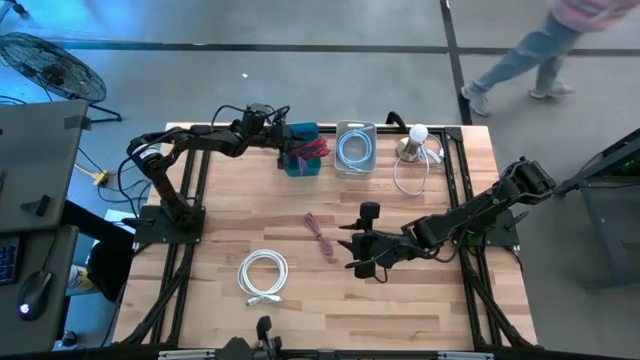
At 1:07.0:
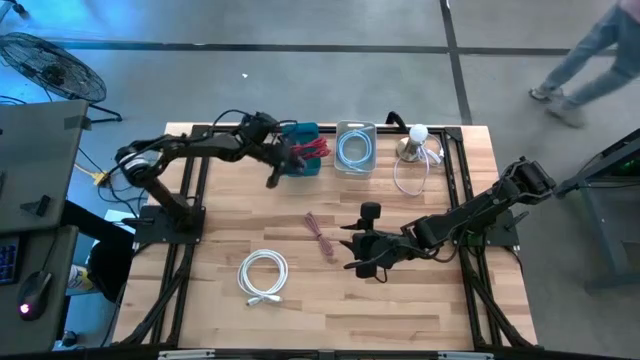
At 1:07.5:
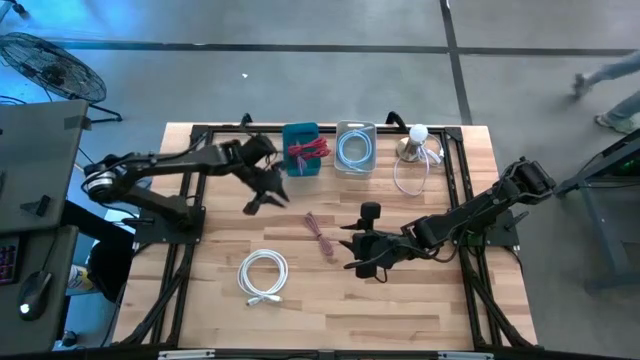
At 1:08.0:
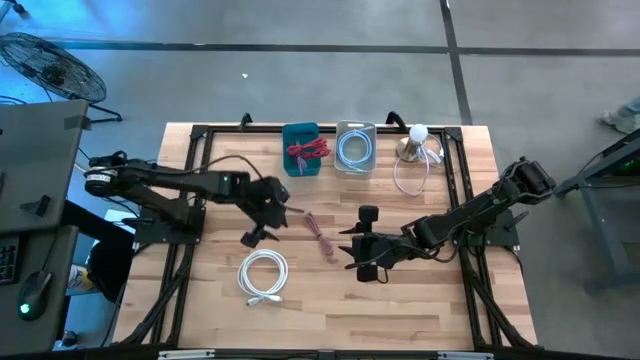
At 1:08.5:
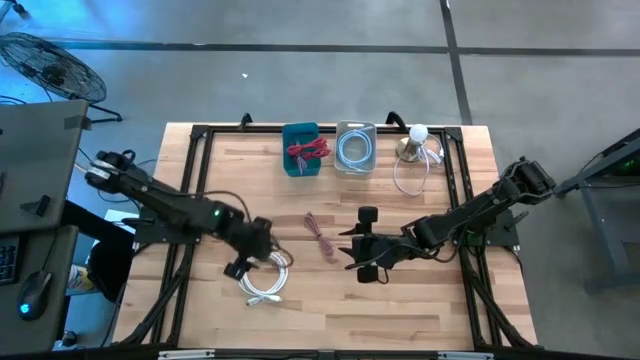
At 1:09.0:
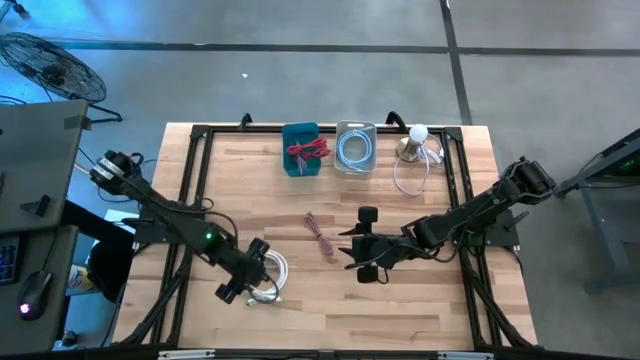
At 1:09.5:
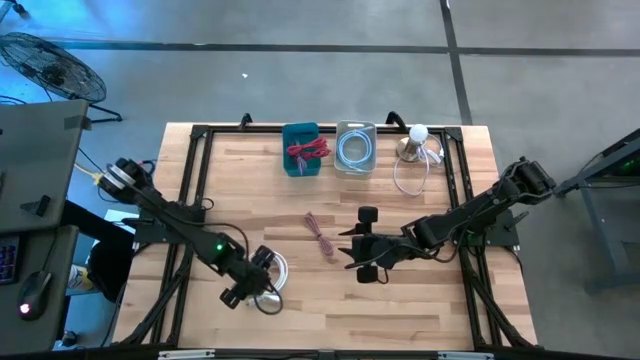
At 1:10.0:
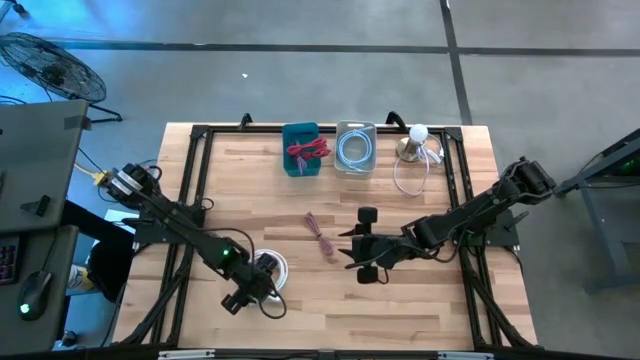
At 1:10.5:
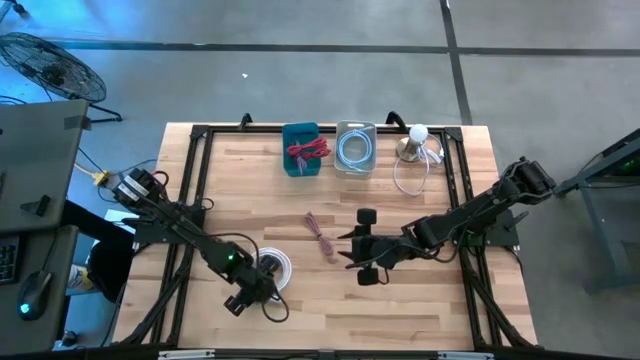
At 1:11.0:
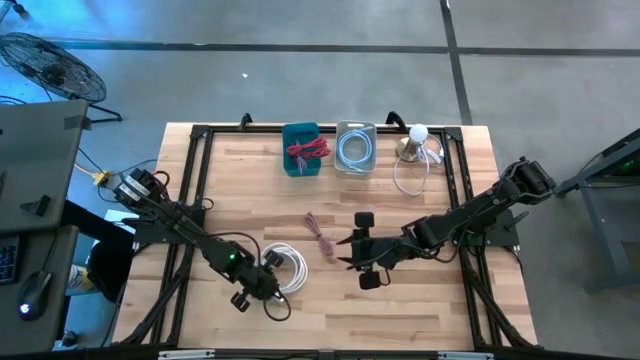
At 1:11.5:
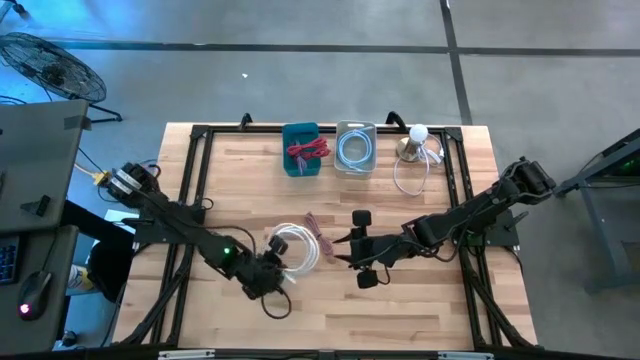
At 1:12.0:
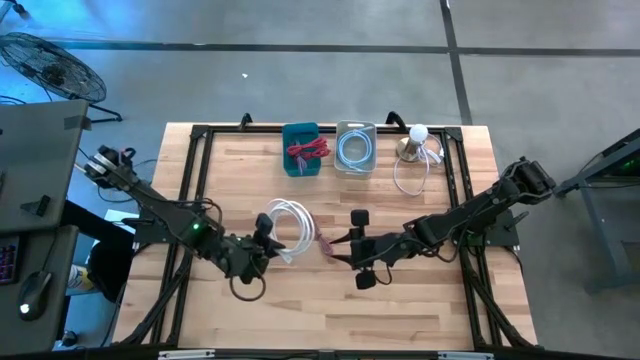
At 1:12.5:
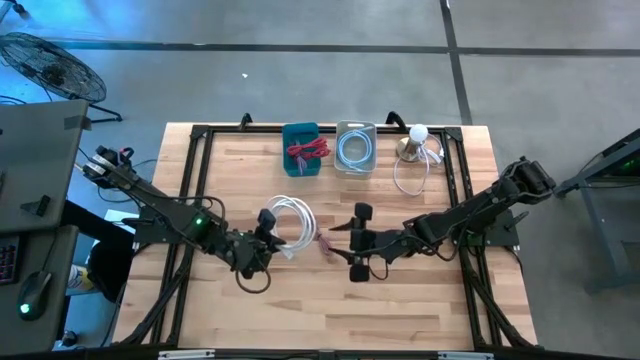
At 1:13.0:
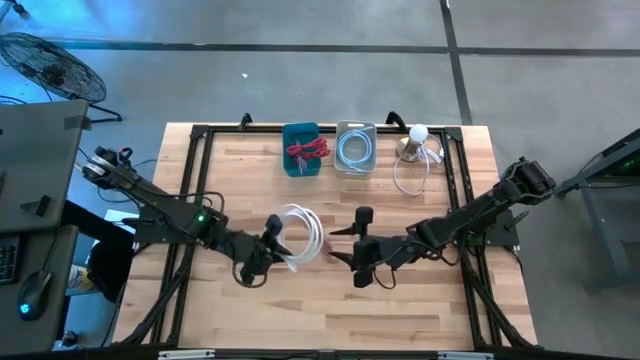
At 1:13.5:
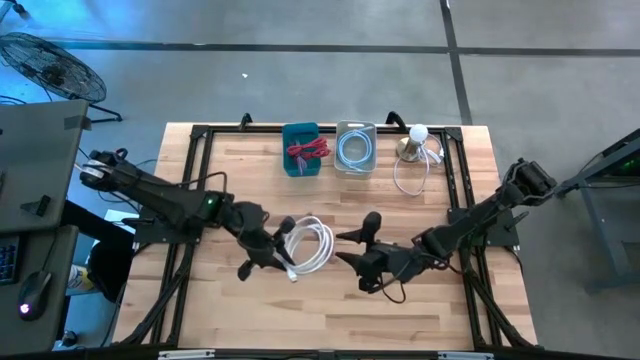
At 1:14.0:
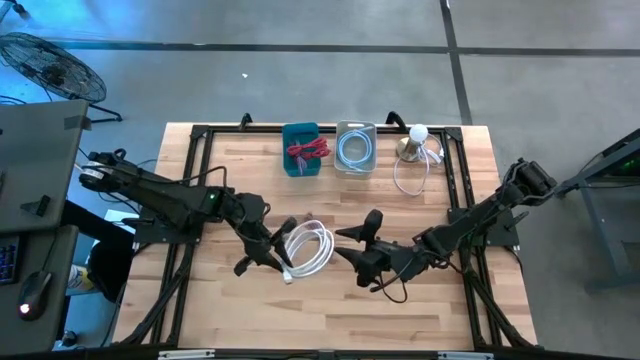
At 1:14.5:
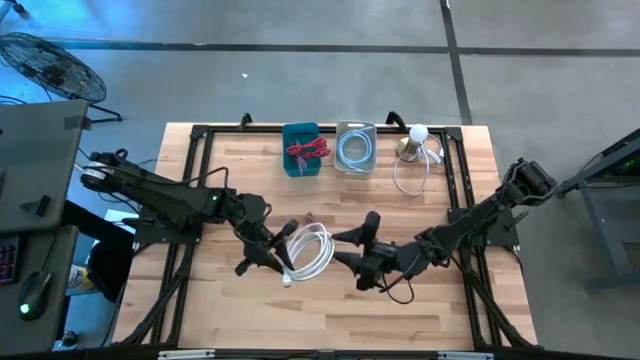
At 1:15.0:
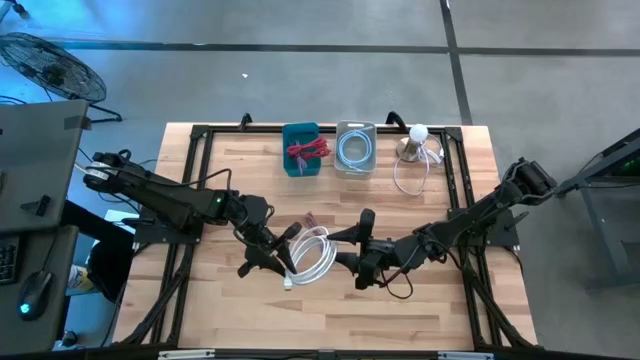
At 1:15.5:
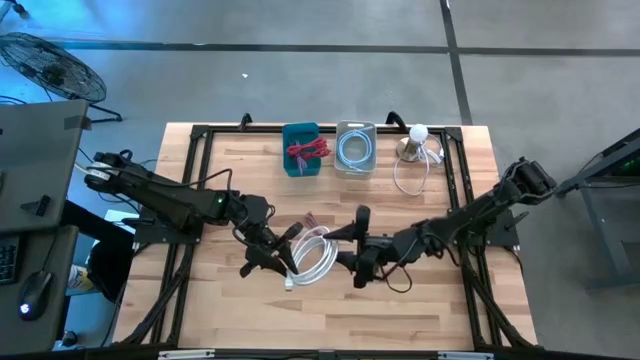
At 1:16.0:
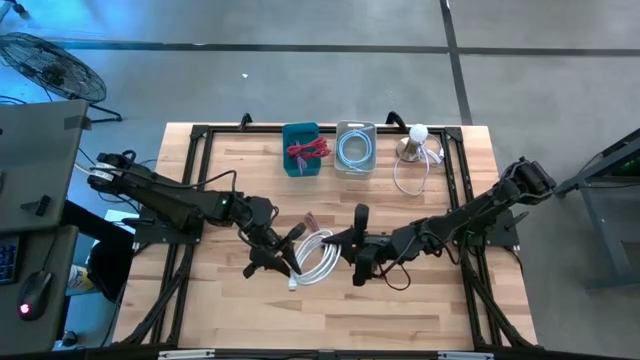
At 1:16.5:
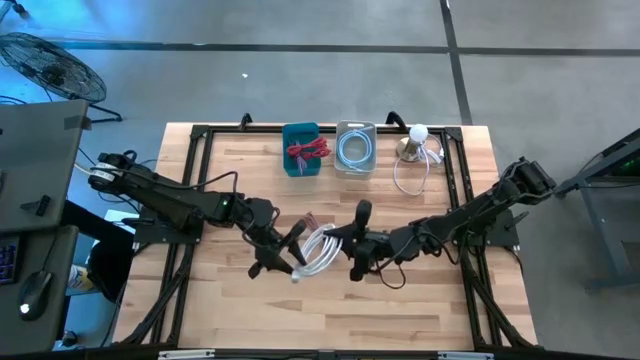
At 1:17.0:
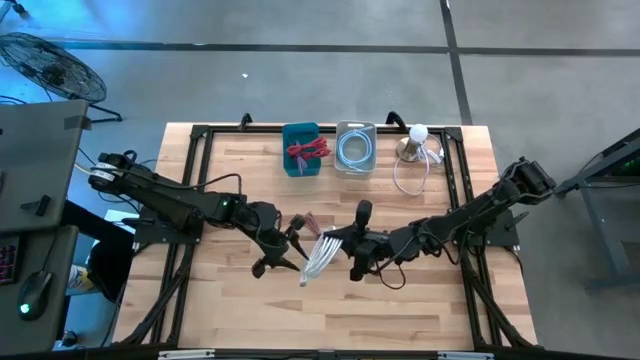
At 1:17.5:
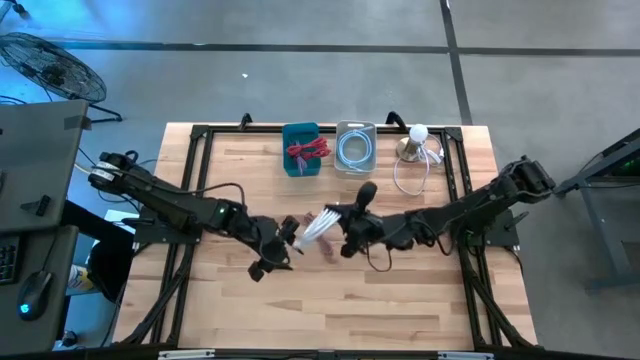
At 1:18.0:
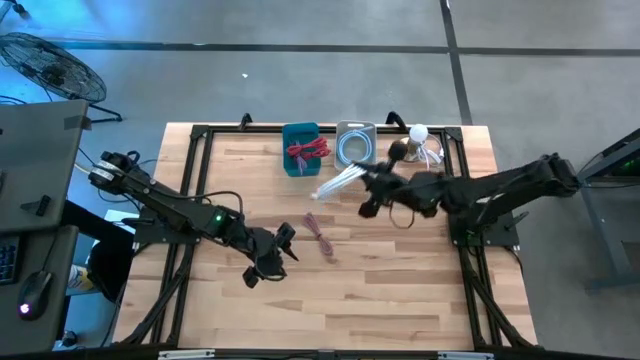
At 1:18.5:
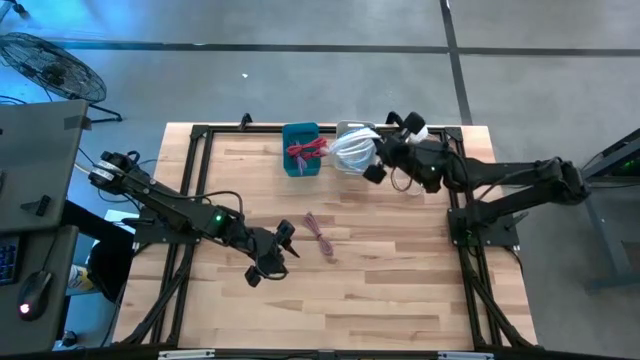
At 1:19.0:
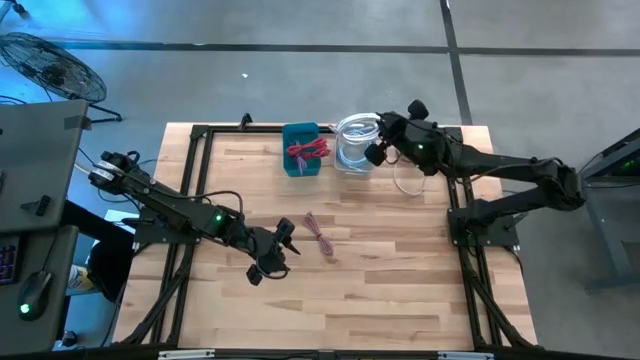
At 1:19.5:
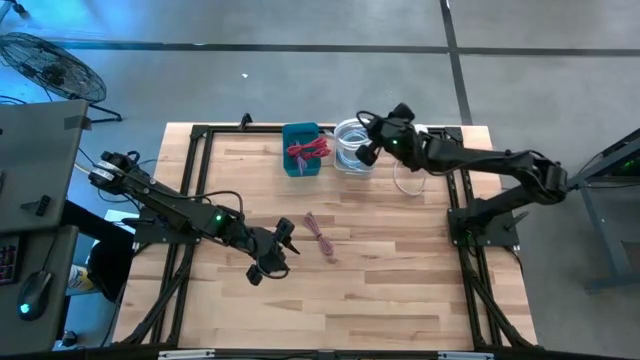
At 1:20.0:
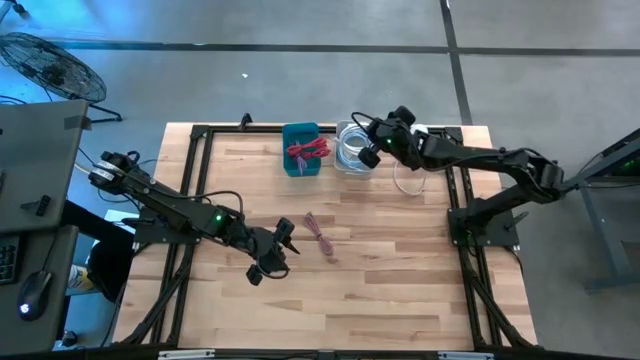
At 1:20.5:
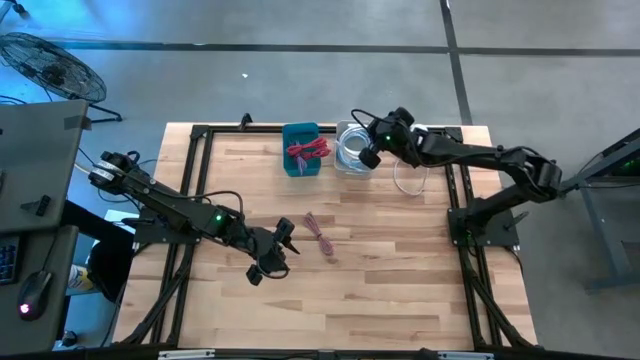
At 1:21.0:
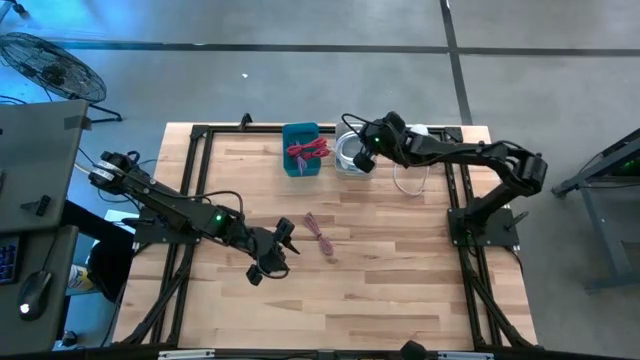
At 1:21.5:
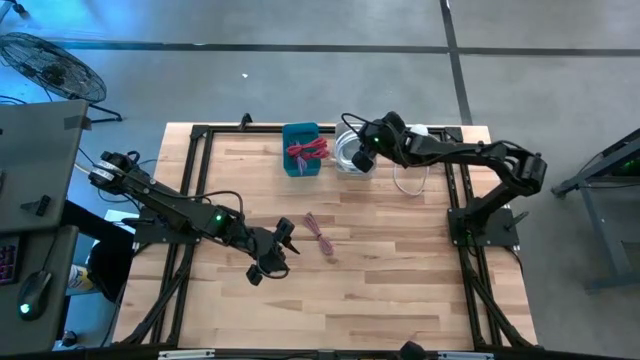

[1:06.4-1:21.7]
Task: Pick & Place USB Port
Put the white HDMI cable into the gray bin

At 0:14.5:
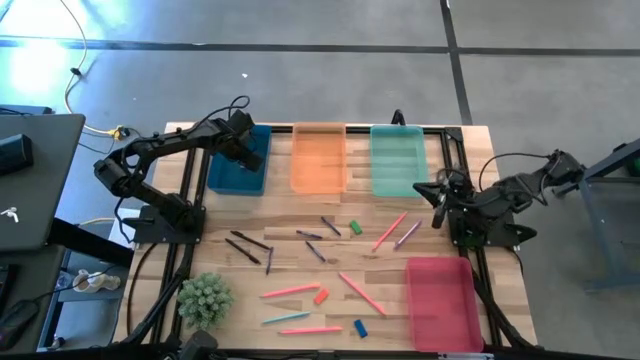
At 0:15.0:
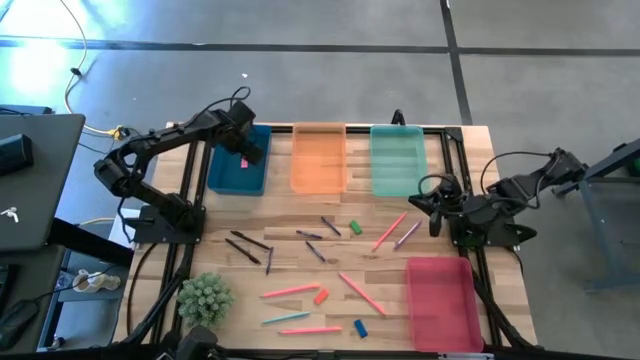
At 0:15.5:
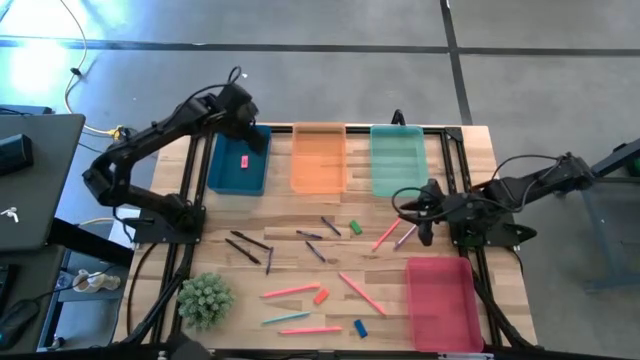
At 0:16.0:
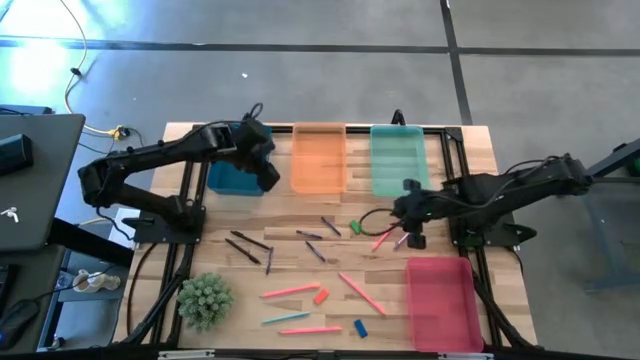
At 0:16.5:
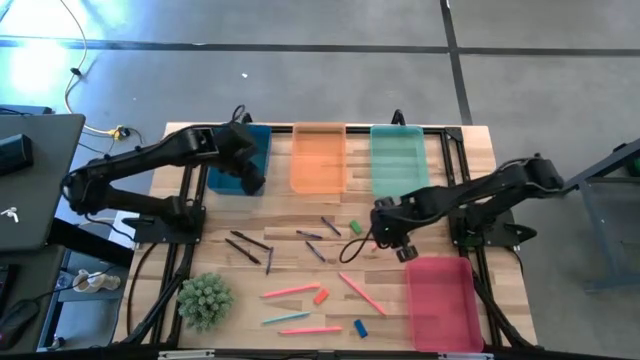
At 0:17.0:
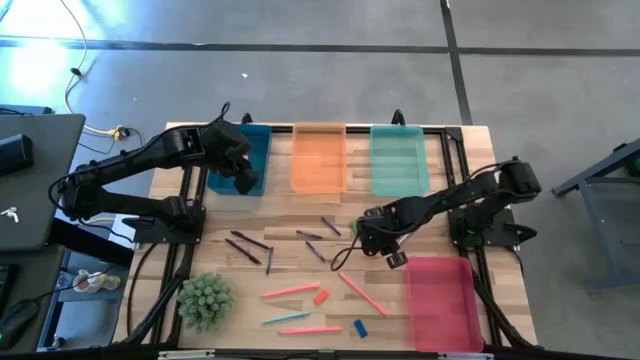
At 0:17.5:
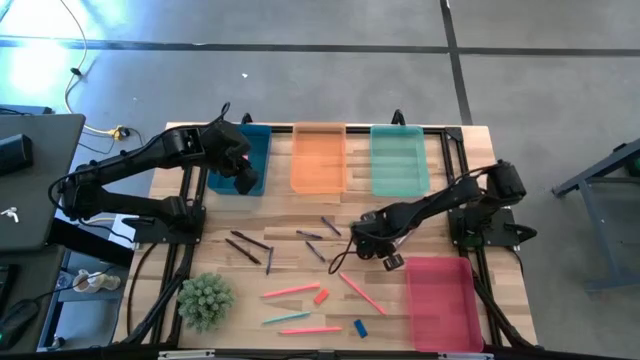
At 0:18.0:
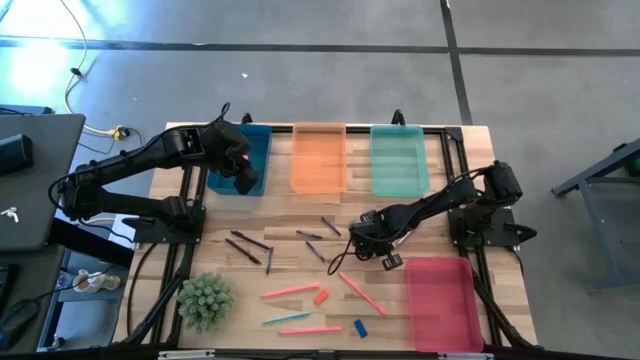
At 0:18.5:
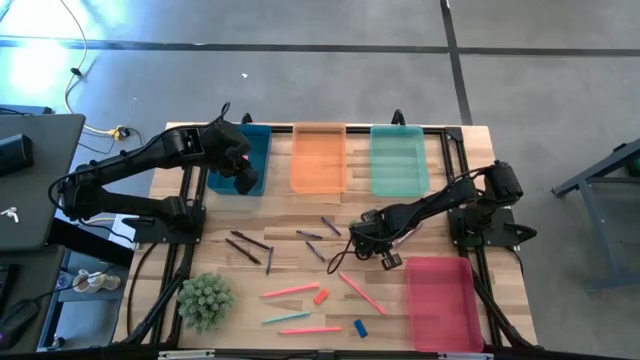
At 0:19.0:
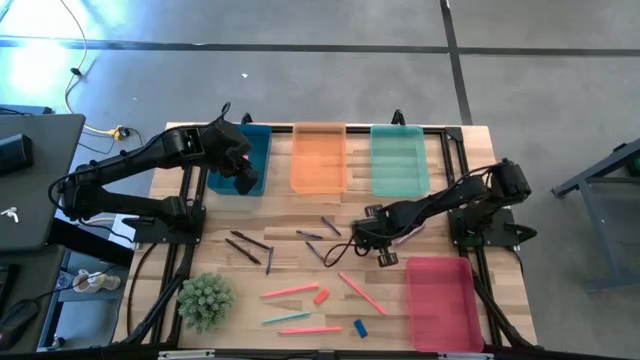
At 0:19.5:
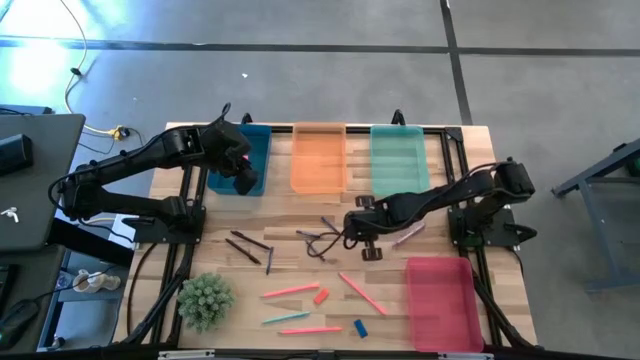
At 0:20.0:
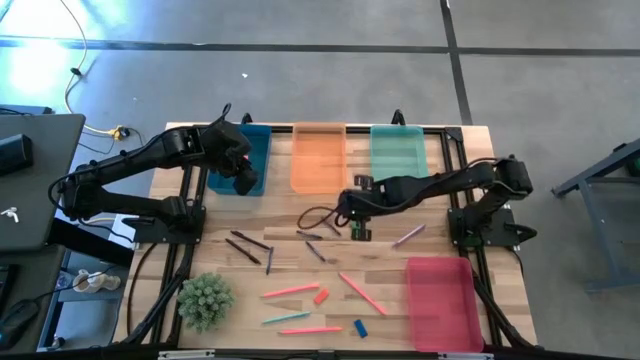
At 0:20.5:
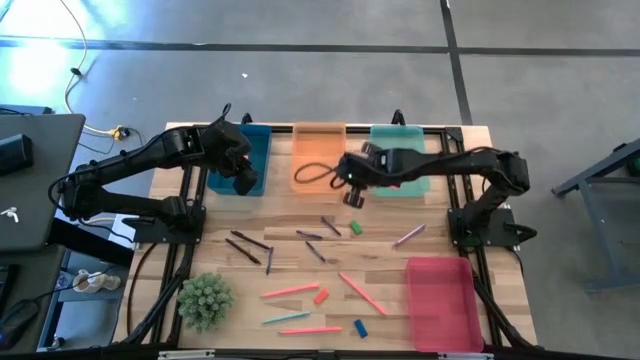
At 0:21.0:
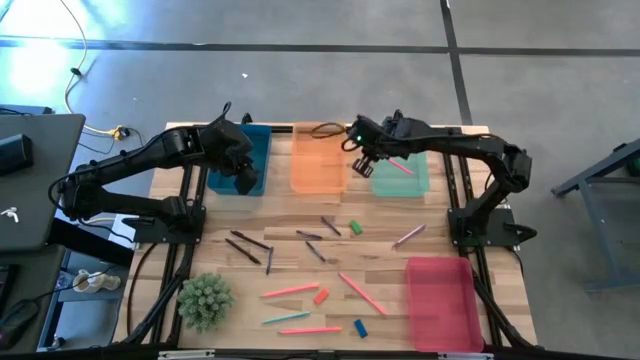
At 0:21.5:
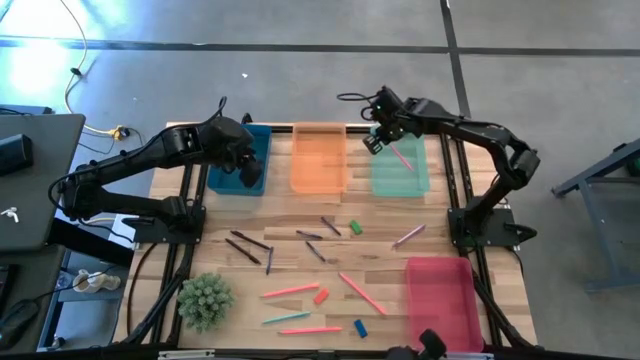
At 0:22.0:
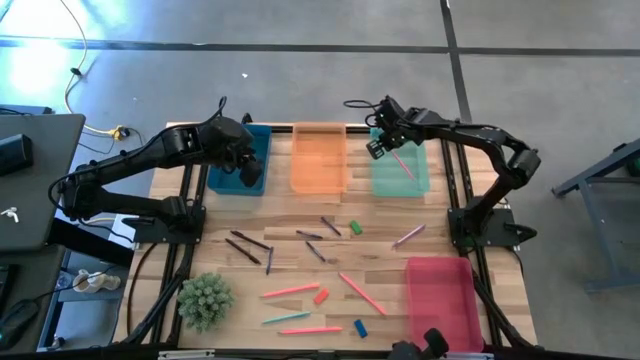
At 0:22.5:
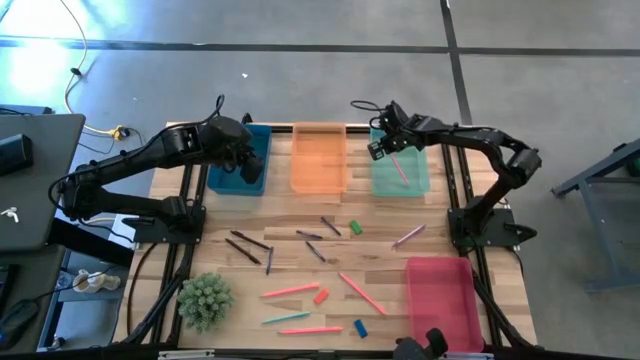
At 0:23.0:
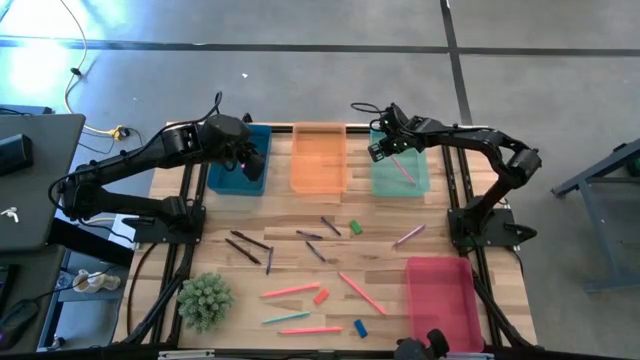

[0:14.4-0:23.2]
Task: Sort crayons/erasers/pens/pencils in bins
Put the top pink pencil into the blue bin
